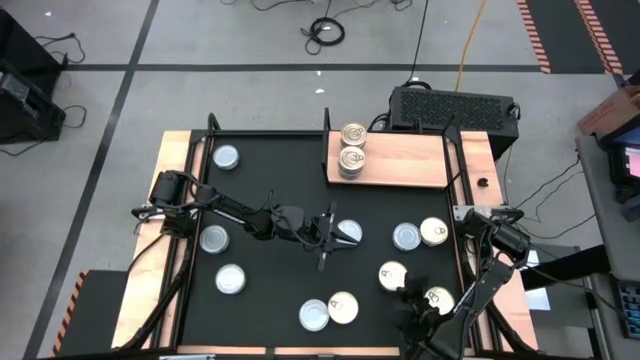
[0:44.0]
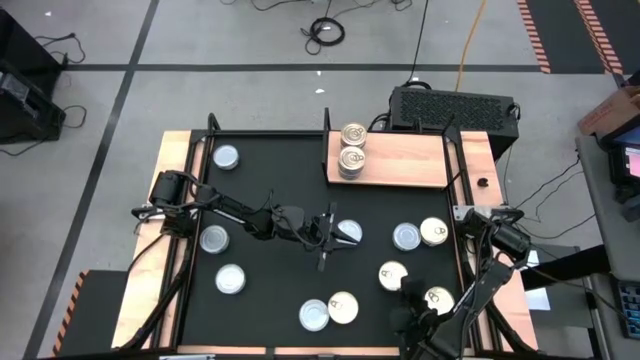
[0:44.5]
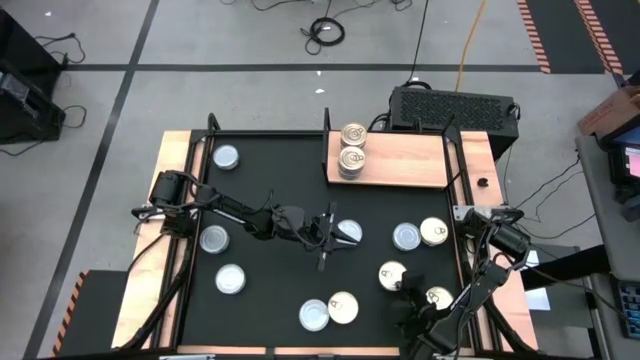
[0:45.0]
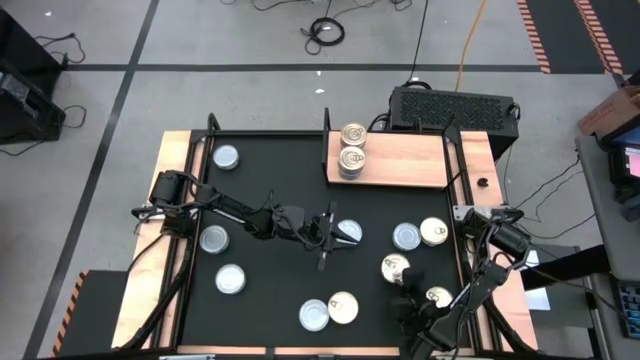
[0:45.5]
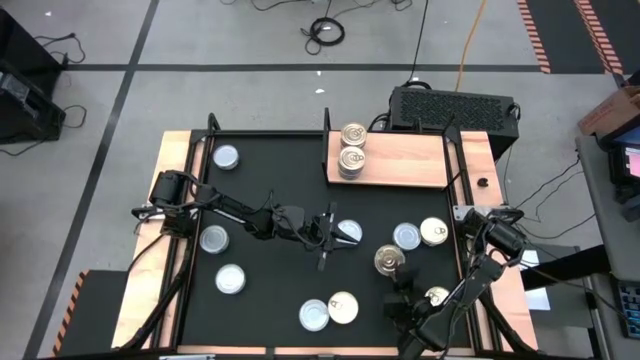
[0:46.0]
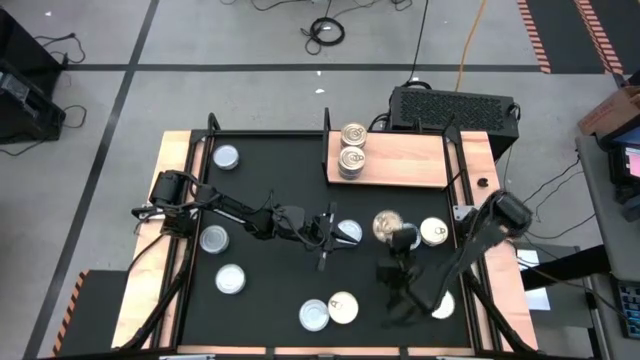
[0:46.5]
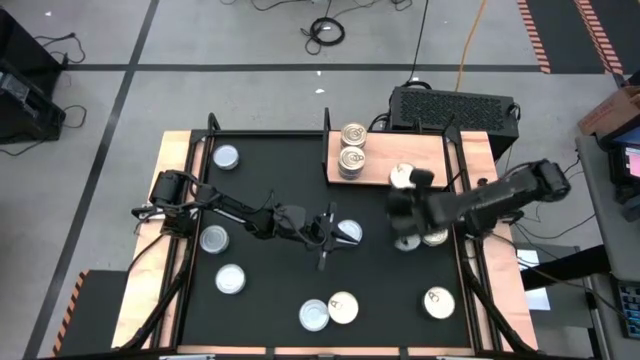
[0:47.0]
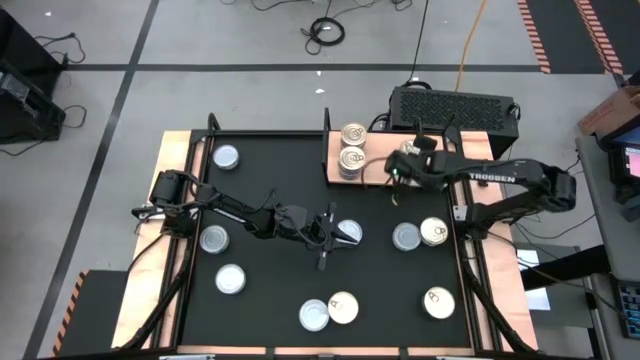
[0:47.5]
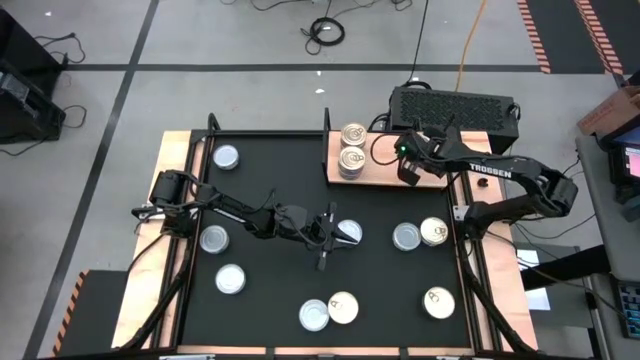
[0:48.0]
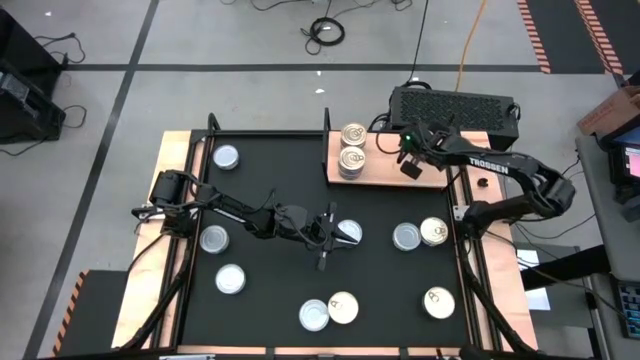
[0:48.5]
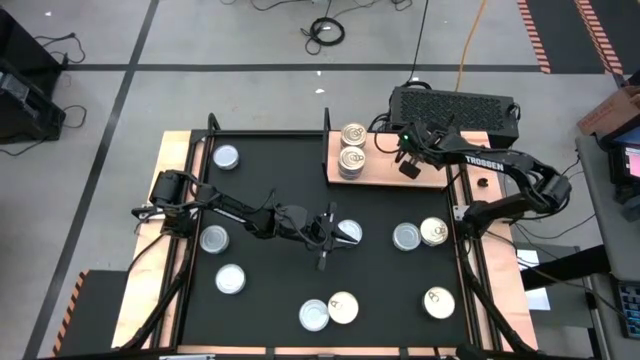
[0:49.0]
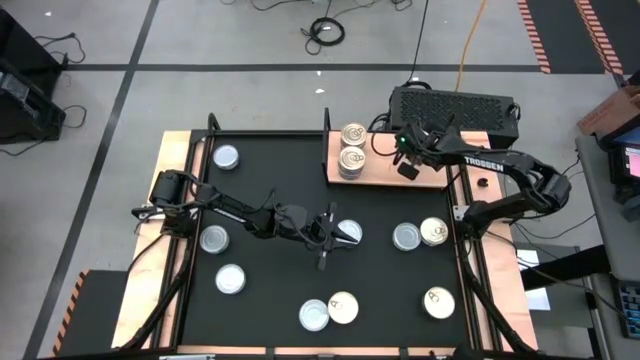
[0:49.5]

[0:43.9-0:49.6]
Task: Stack canned seafood by type on shelf
Put the blue-pink tuna can to the top right corner of the shelf

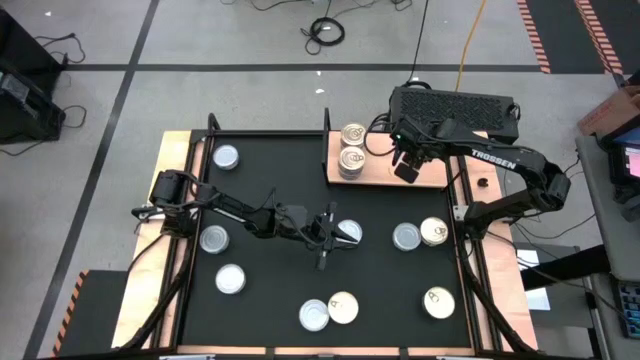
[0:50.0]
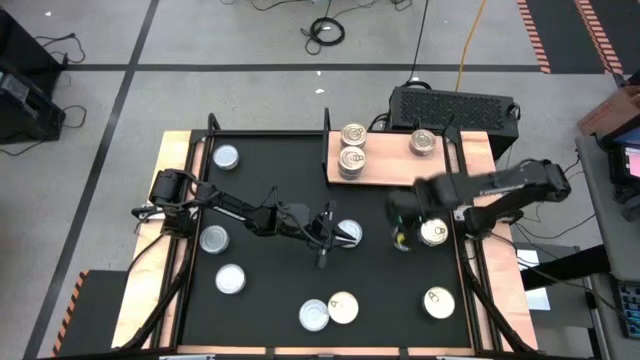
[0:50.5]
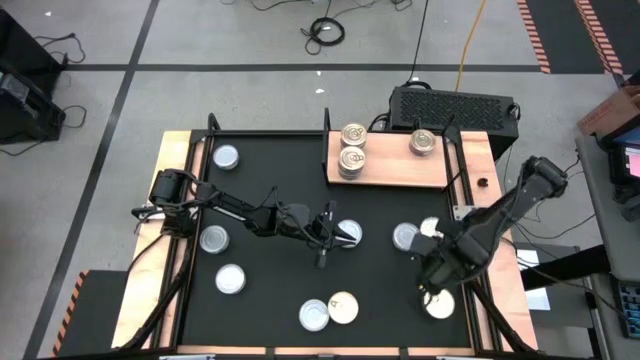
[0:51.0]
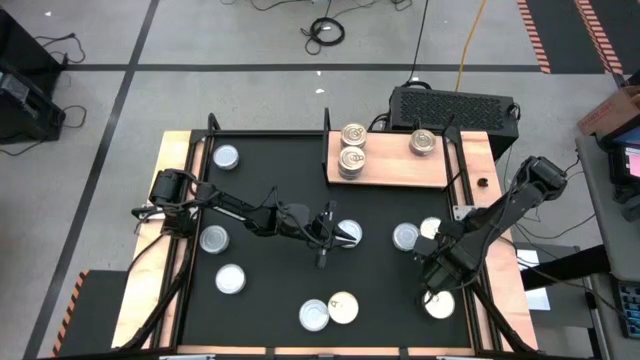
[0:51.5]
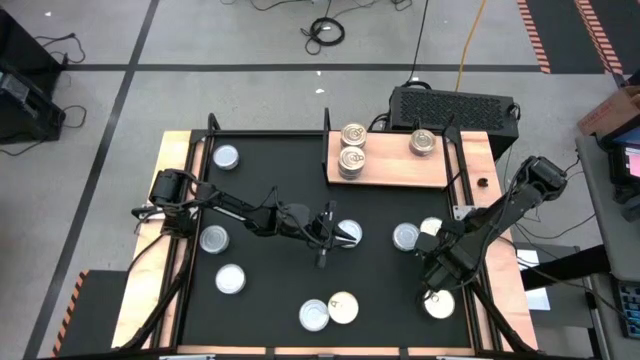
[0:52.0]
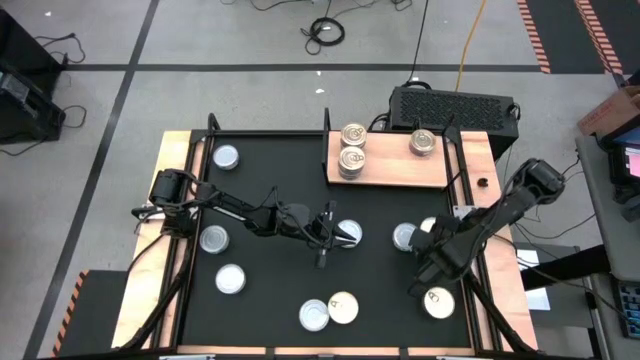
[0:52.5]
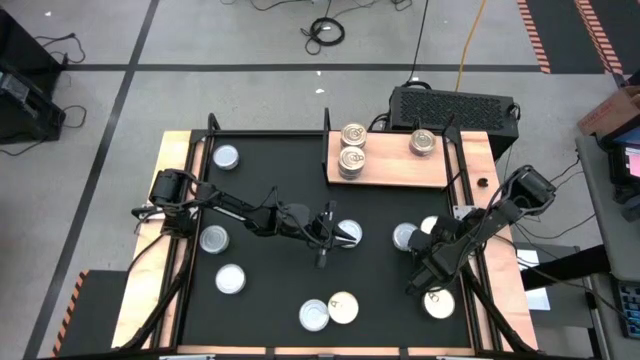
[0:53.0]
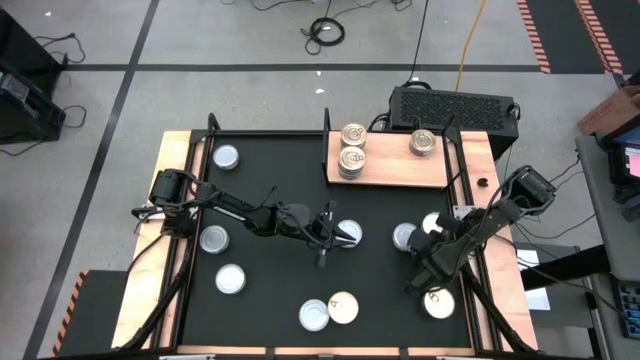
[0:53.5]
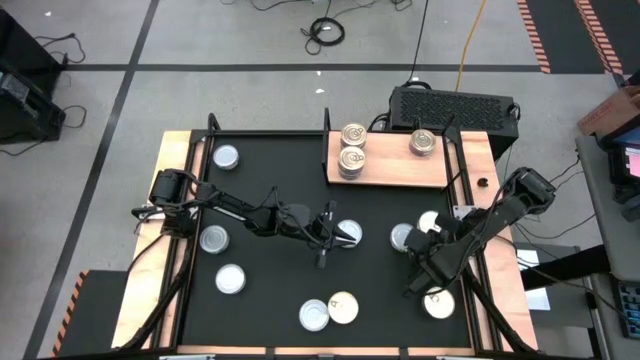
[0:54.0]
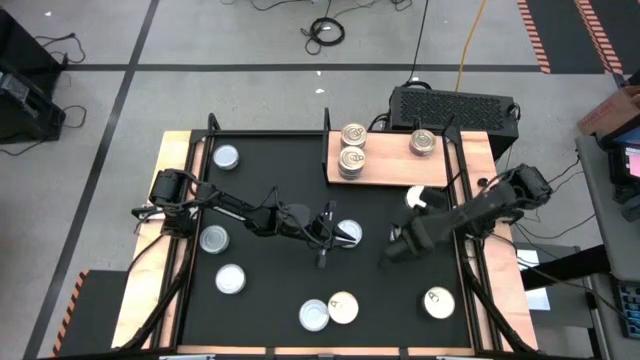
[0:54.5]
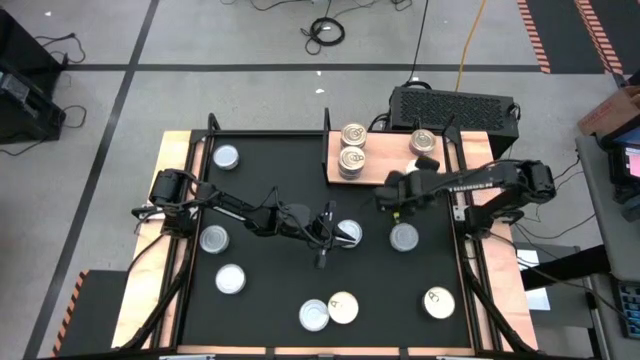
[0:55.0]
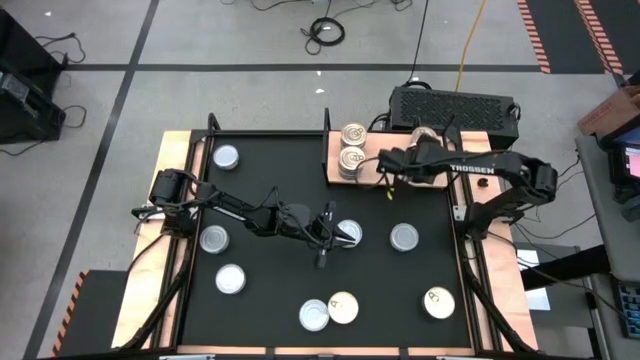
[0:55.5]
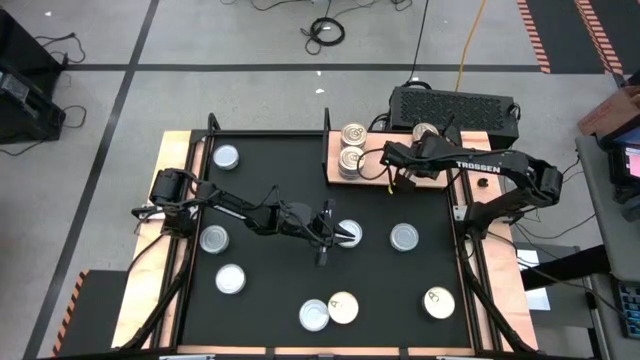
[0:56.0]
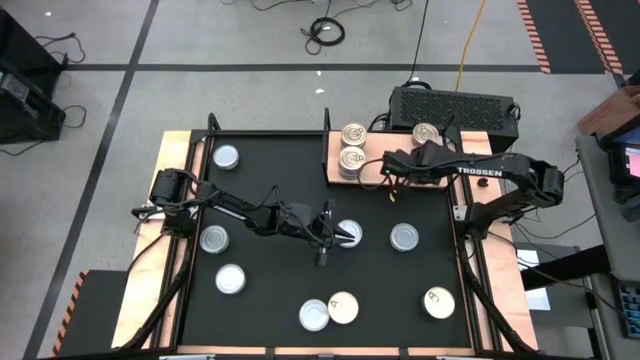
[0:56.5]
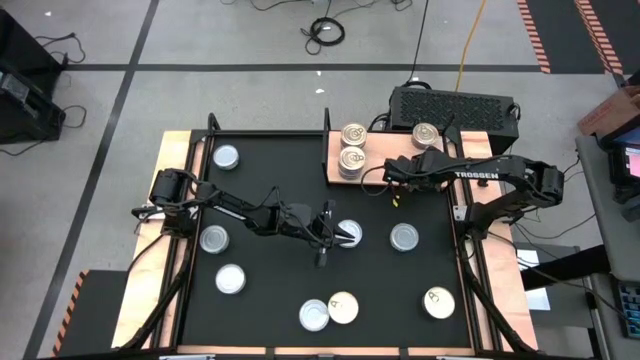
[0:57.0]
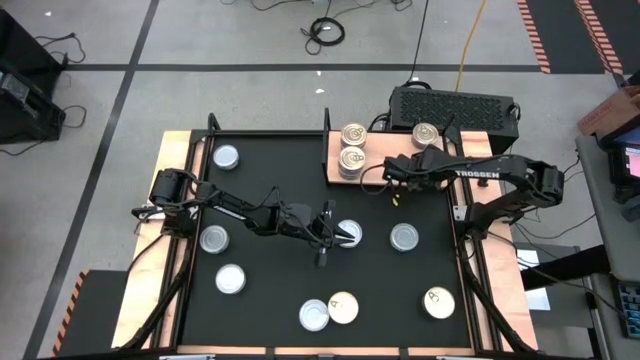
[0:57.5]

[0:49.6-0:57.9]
Put the blue-pink tuna can aligned with the top right blue-pink tuna can on the shelf

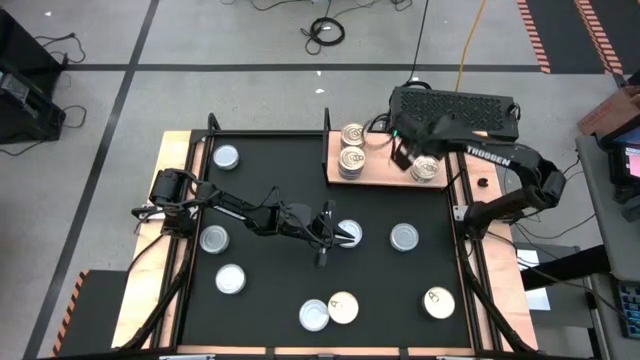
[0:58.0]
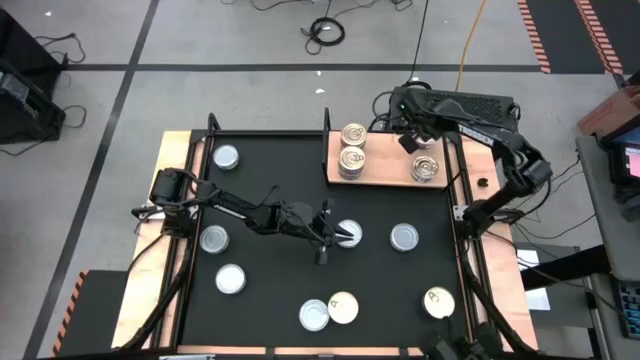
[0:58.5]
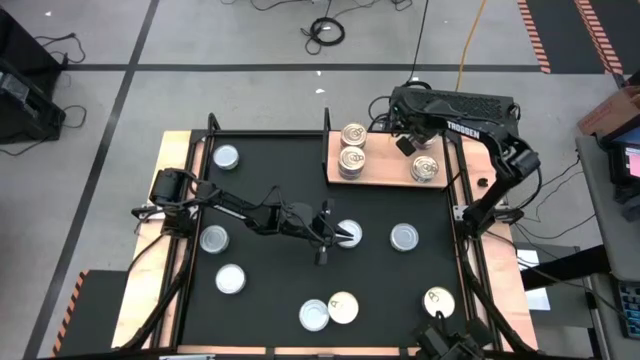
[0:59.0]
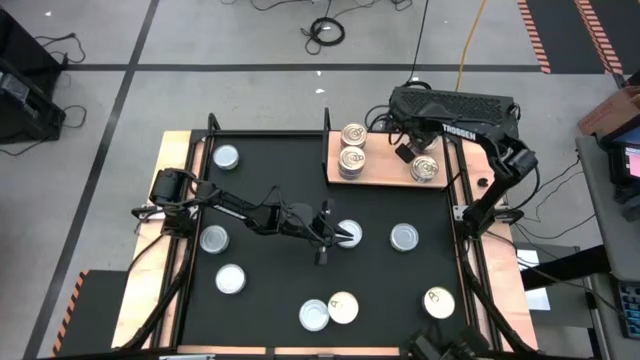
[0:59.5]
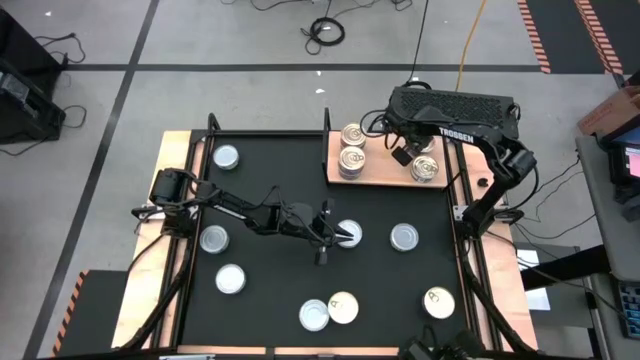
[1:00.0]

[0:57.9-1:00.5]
Adjust the top right blue-pink tuna can on the shelf

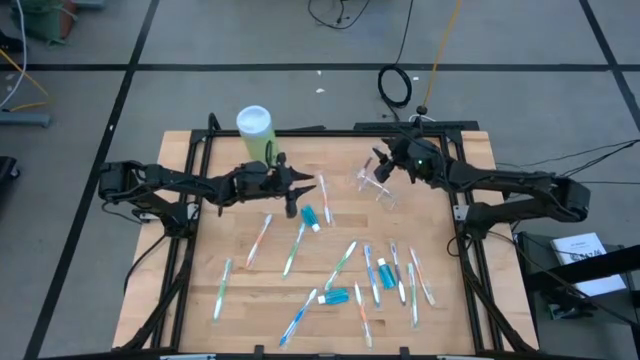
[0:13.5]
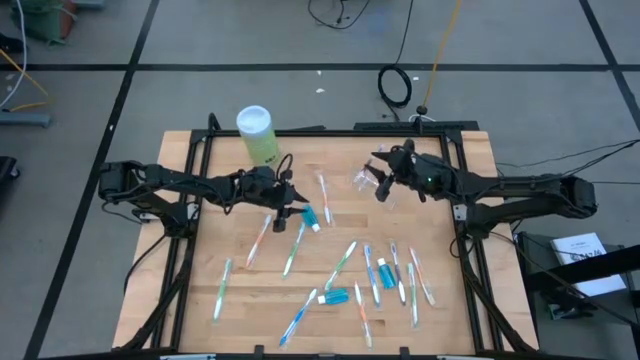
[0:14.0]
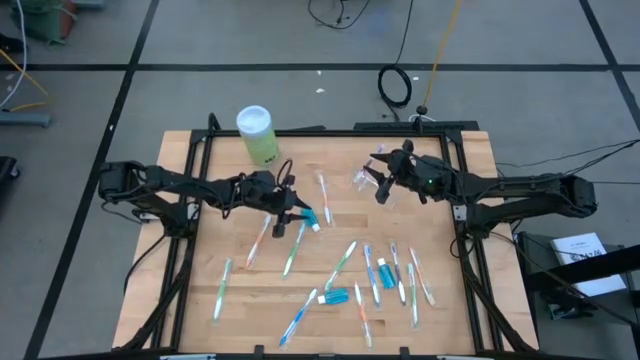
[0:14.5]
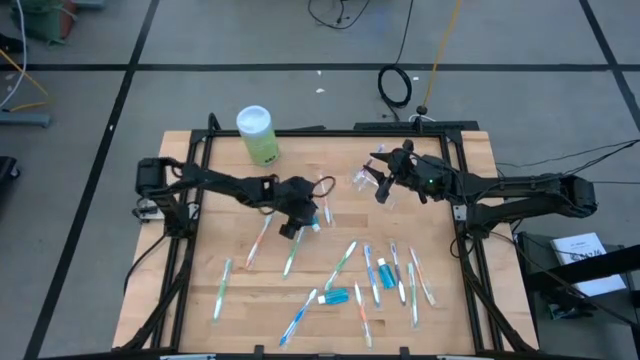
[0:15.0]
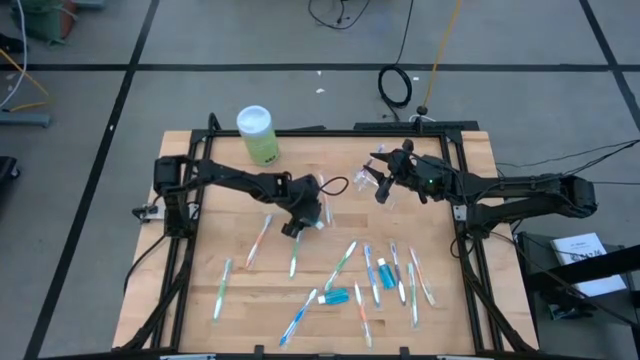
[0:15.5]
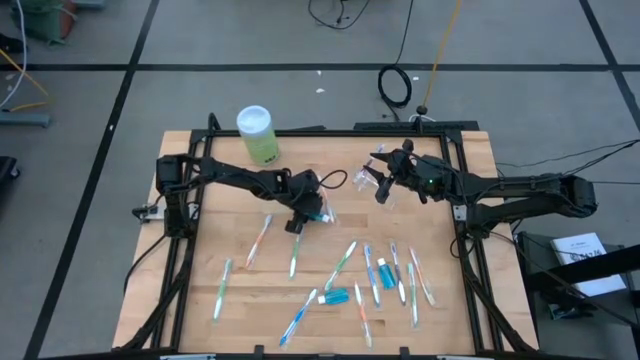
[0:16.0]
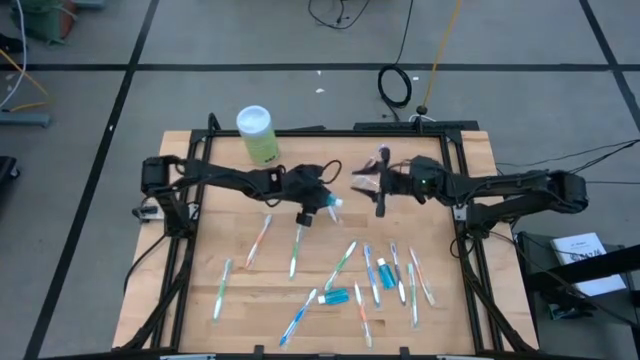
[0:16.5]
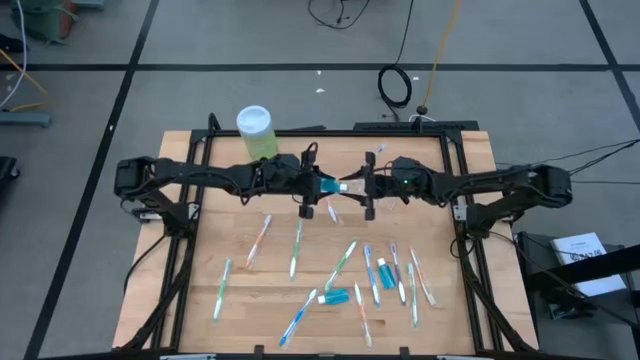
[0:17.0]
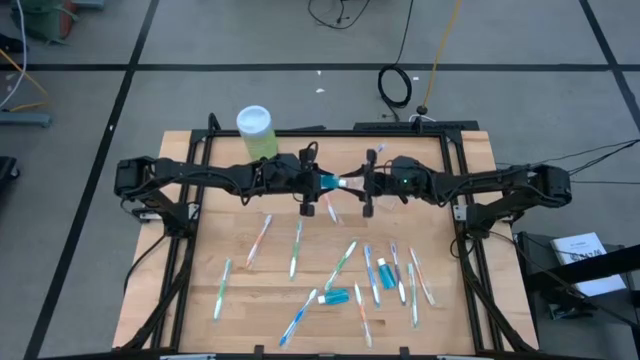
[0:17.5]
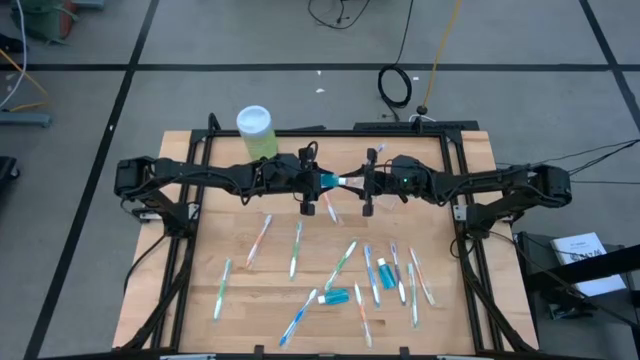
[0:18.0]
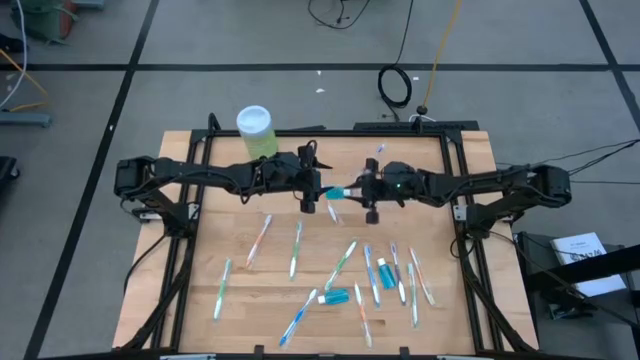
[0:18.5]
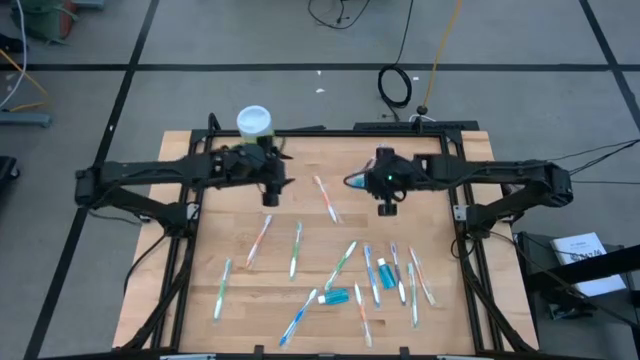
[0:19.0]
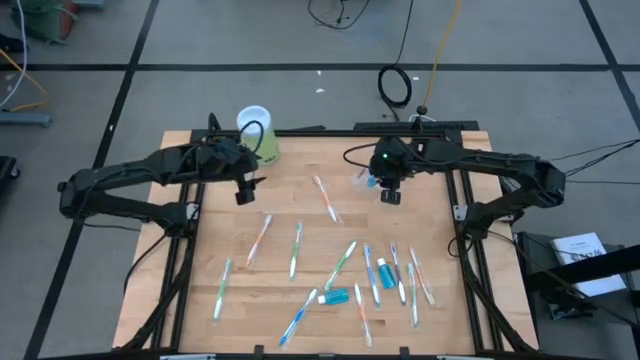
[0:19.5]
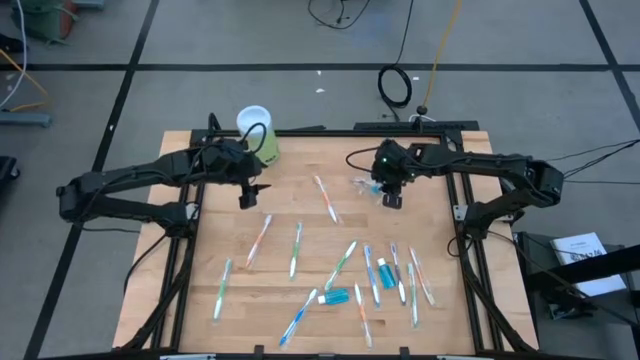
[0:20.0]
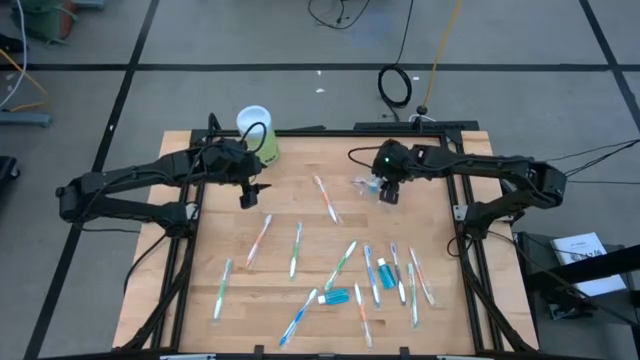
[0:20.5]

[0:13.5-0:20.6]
Task: Pick & Place toothbrushing station
Put the mouthwash into the transparent organizer
